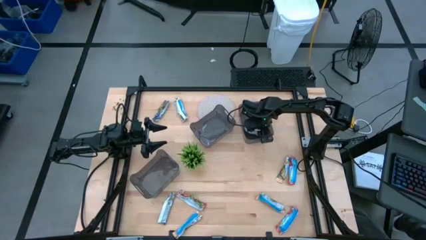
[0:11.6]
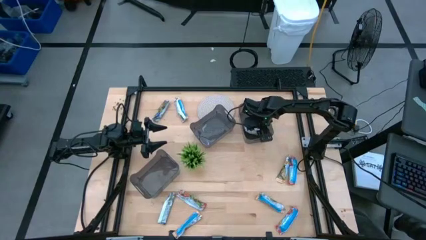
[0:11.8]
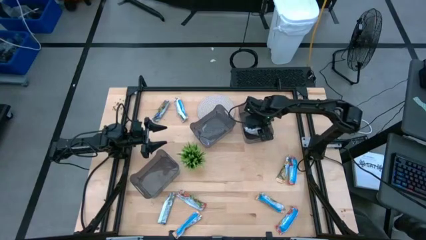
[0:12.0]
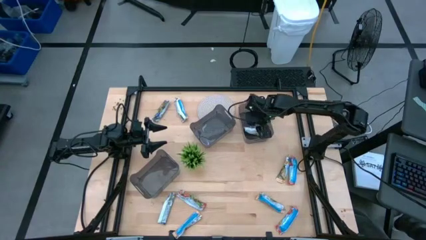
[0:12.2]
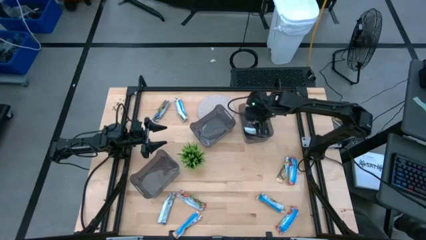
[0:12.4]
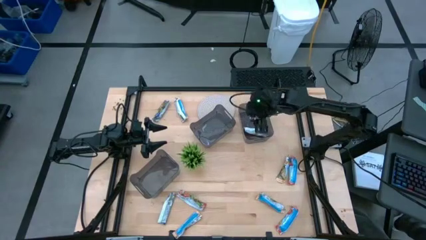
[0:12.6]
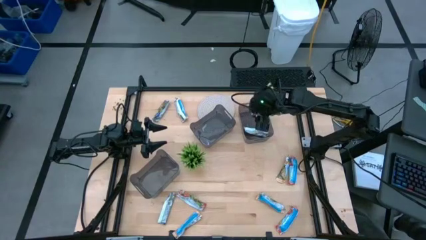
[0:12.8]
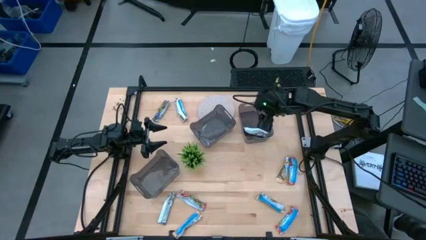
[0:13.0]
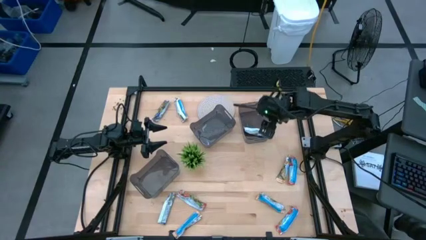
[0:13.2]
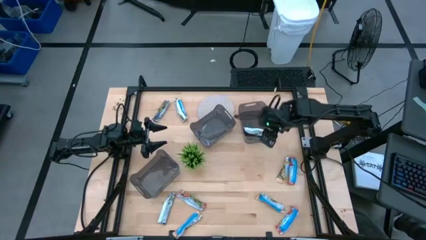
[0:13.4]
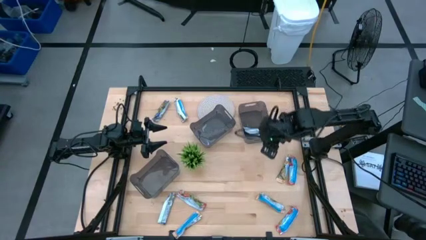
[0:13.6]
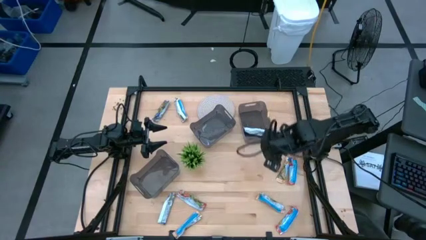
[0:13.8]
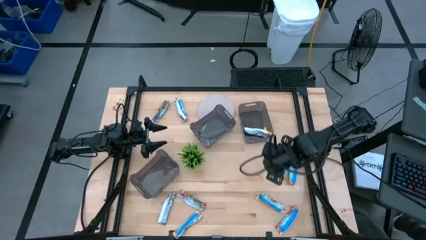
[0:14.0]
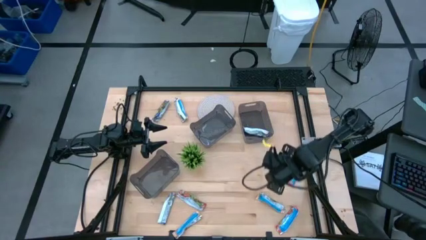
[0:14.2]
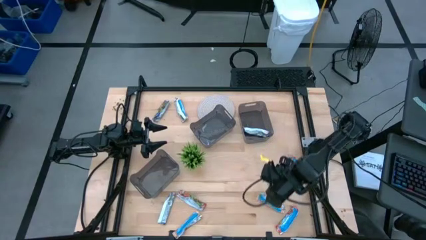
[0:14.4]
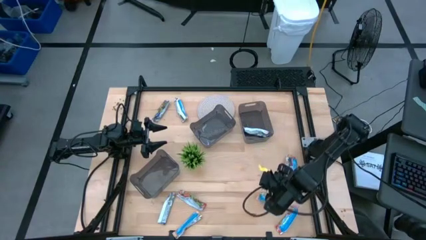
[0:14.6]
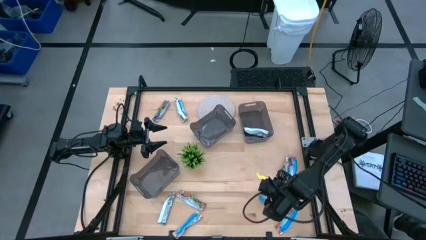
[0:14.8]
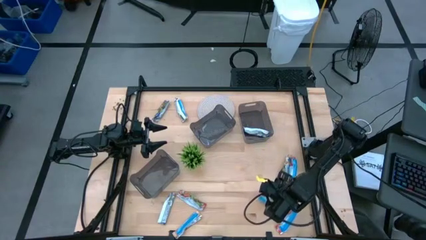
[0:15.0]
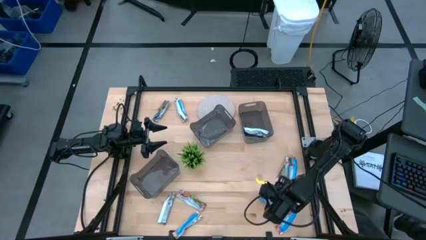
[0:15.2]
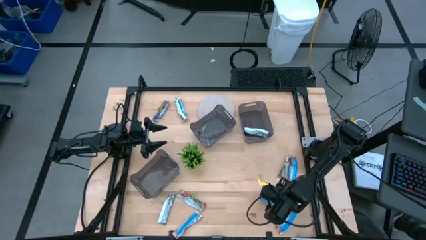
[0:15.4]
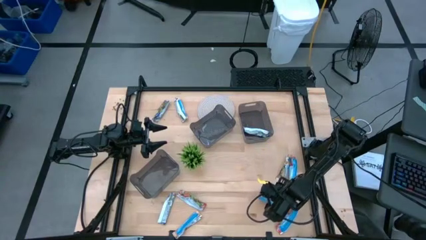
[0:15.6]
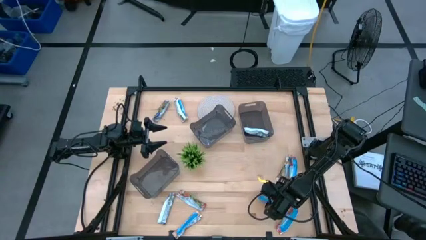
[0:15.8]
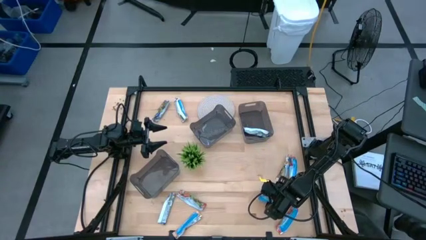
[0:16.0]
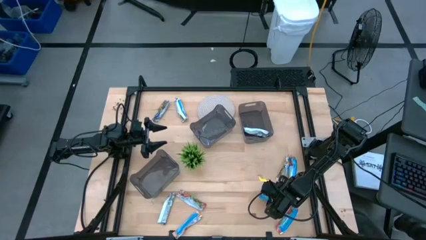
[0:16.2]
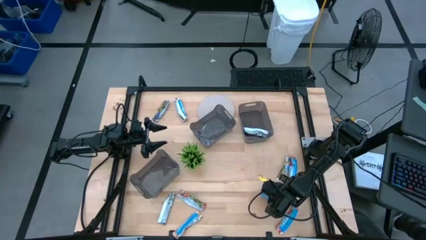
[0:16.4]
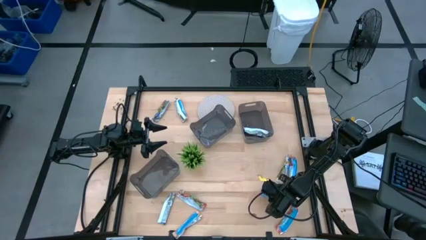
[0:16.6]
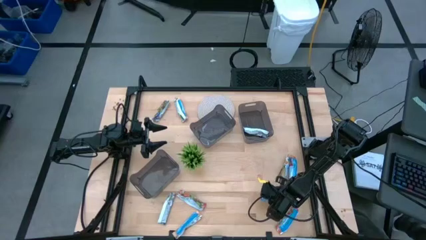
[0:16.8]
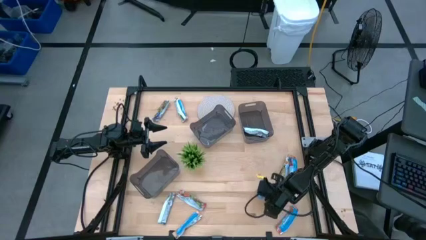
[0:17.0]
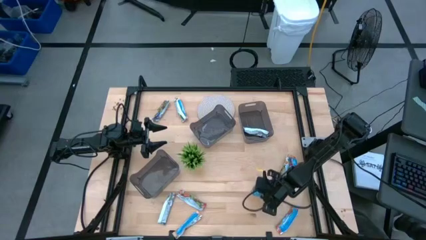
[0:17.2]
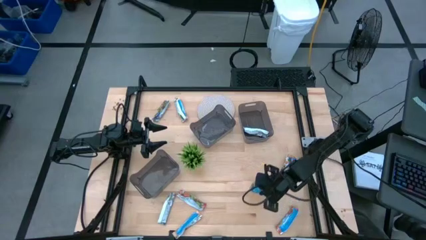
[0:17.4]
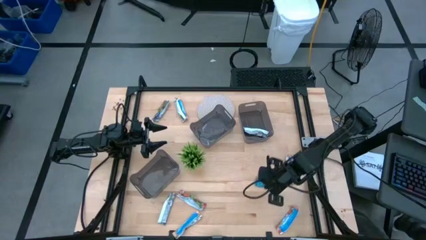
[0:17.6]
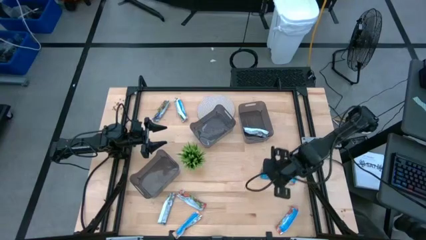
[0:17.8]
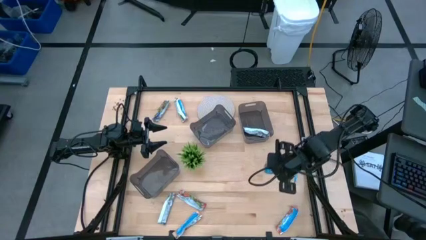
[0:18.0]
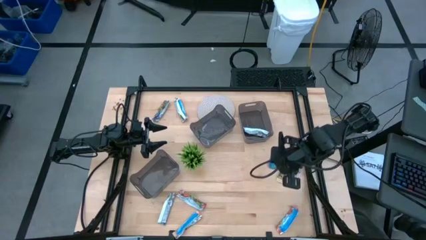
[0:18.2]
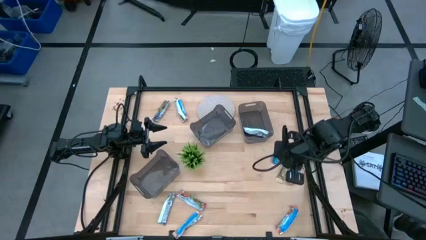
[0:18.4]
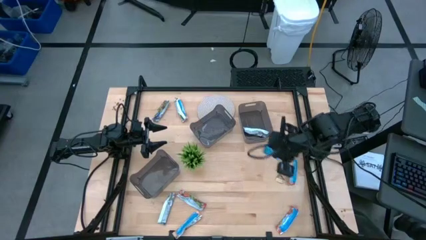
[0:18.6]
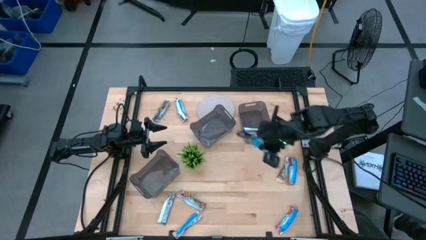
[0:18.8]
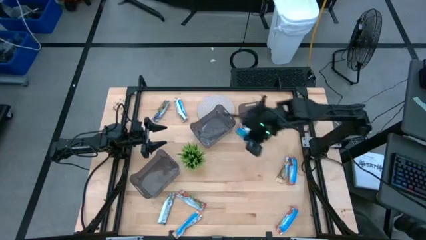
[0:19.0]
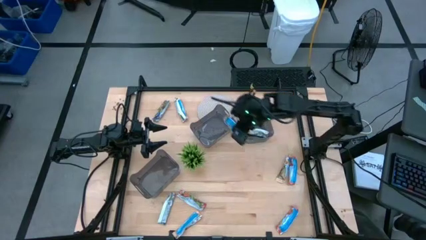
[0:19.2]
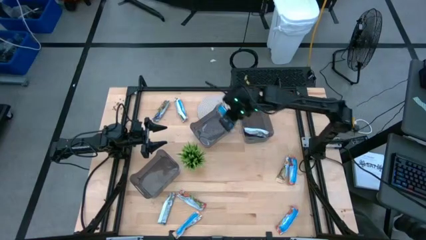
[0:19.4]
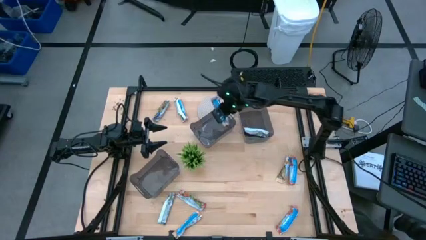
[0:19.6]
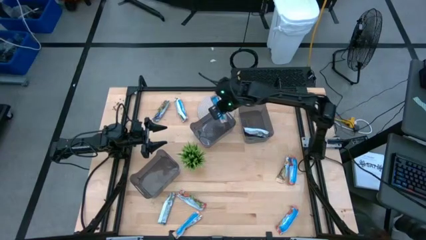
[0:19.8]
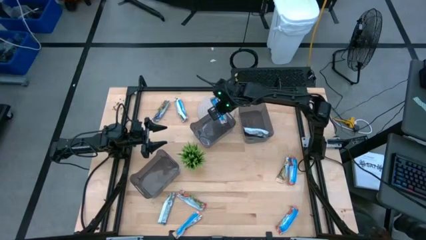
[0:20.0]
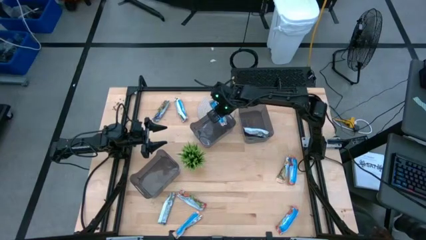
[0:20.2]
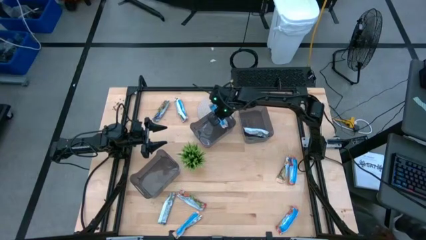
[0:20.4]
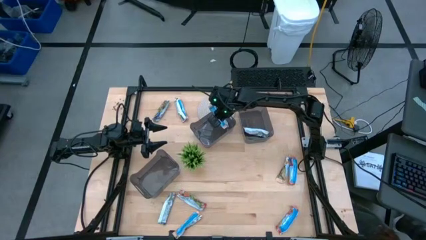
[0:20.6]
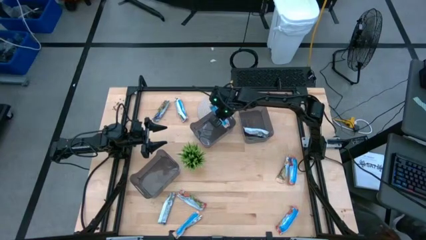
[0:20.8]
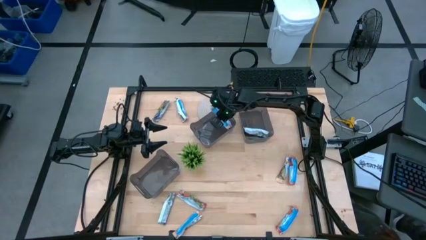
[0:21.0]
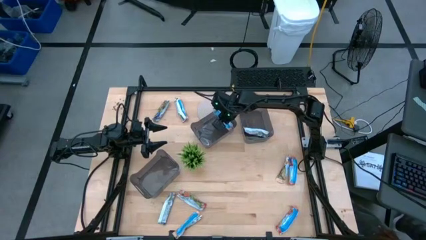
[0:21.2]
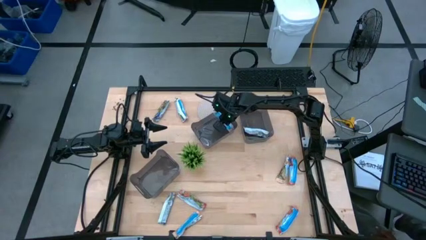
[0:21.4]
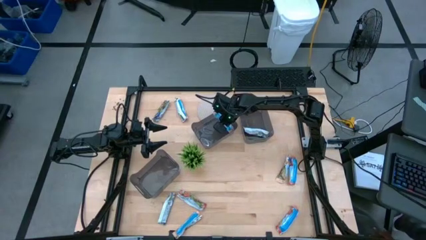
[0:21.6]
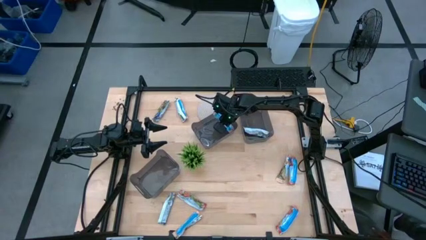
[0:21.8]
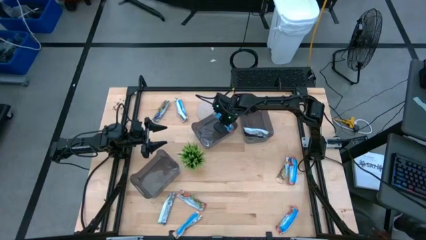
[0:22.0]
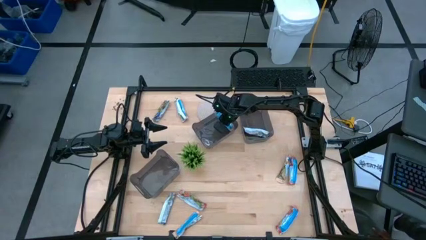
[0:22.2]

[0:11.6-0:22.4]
Task: Pick and place Granola Bars by type
Put the yellow granola bar into the top left black bin

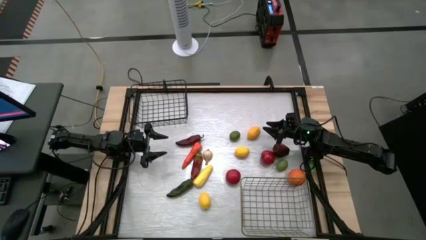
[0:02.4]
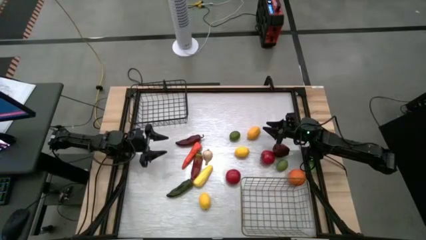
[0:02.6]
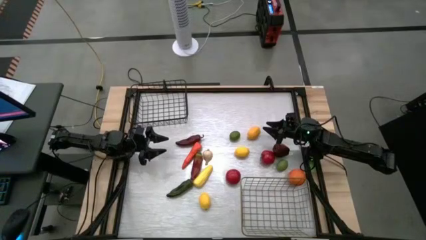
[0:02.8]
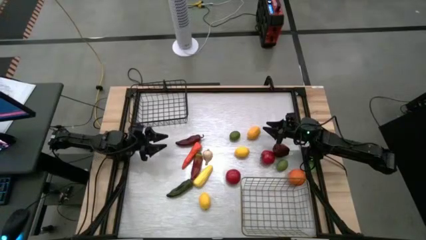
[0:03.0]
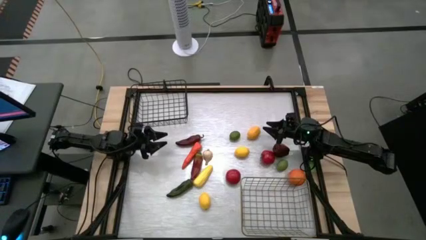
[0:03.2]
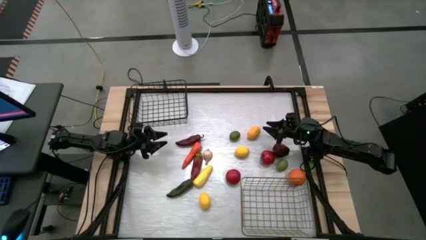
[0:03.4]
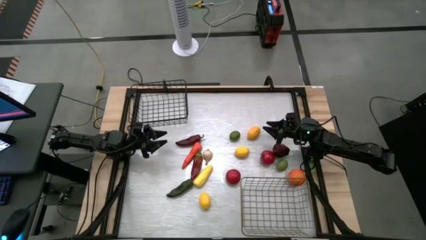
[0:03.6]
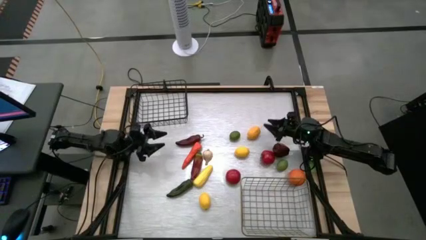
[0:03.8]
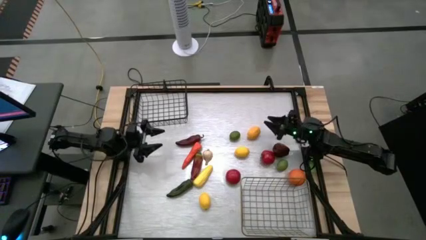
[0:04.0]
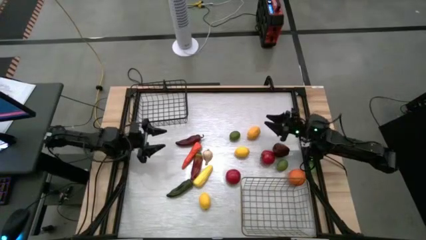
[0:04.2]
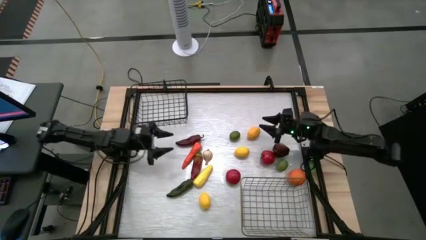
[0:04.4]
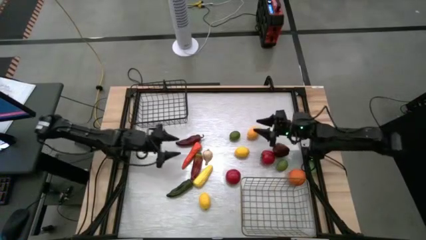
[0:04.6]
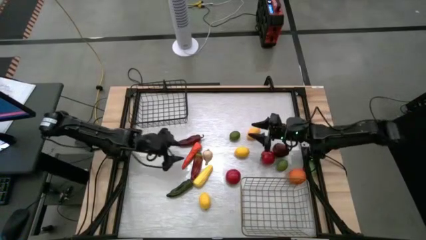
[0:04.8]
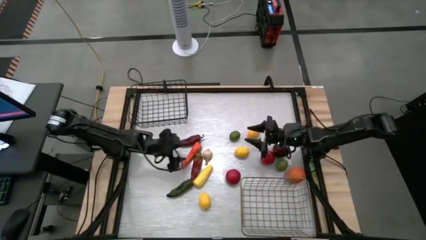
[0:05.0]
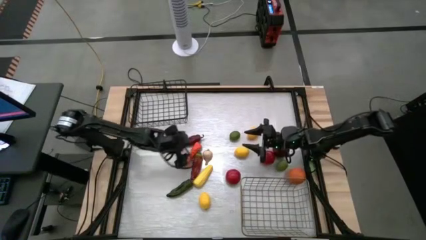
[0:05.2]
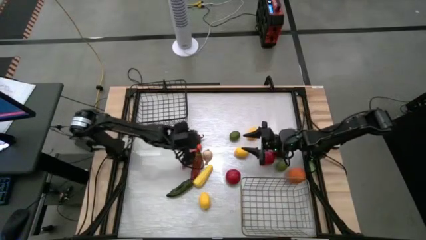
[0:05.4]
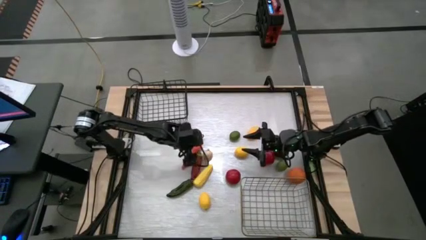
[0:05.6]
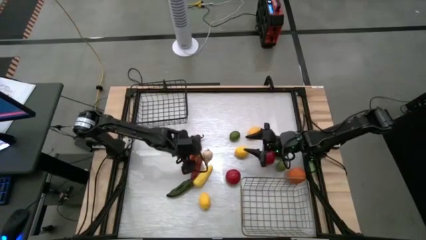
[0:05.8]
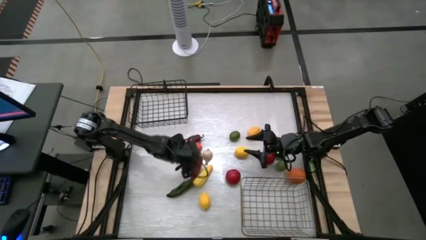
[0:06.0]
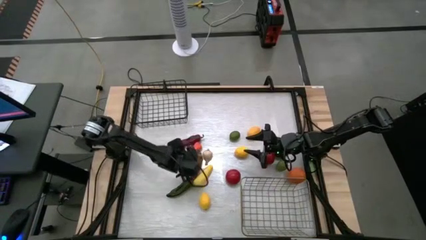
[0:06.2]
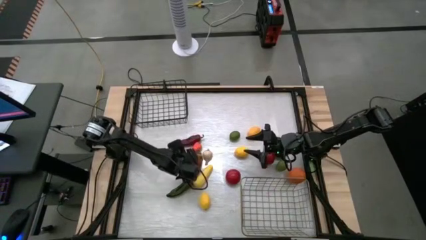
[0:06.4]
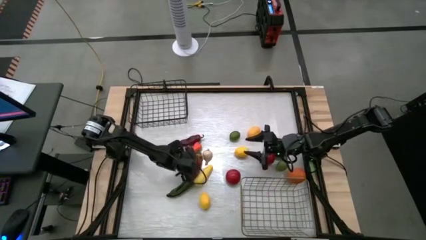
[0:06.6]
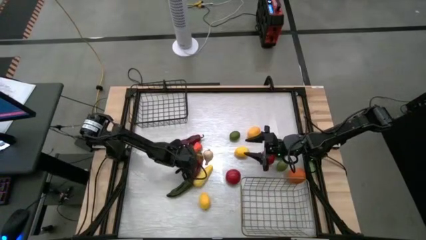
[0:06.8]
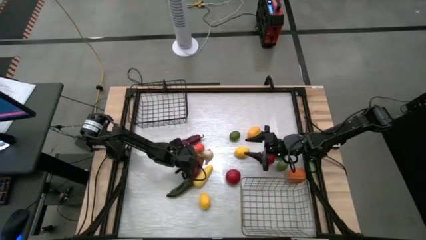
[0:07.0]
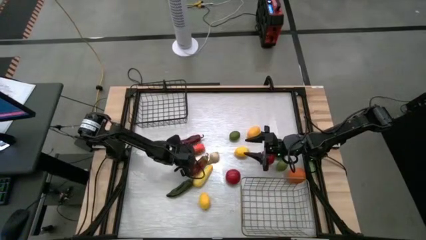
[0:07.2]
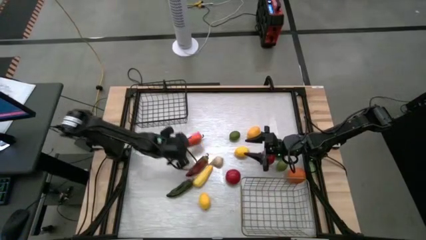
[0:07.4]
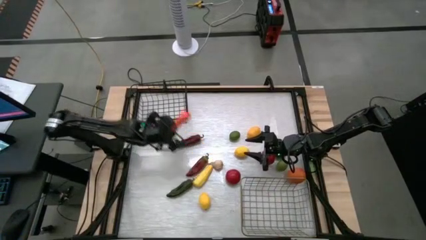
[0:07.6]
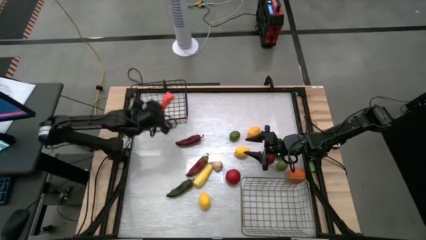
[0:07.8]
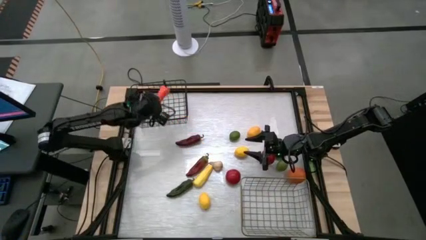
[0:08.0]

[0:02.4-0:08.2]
Task: Sort produce into baskets
Put the carrot into the black wire basket
